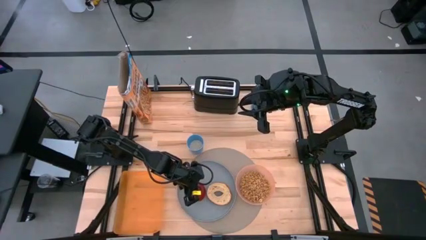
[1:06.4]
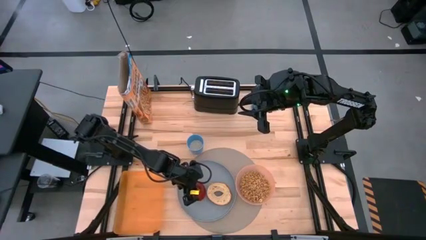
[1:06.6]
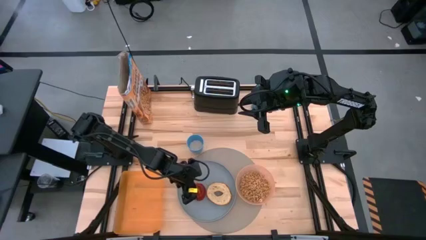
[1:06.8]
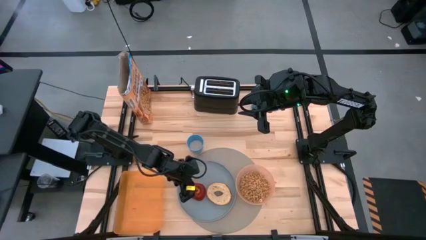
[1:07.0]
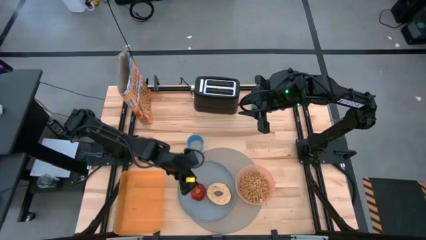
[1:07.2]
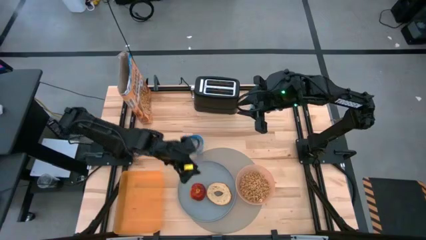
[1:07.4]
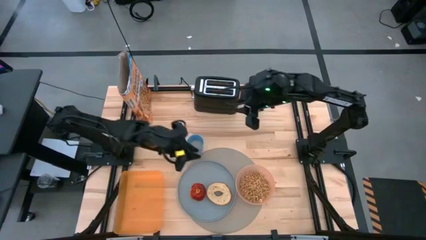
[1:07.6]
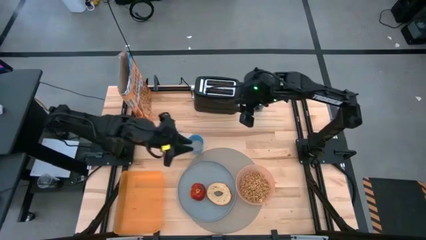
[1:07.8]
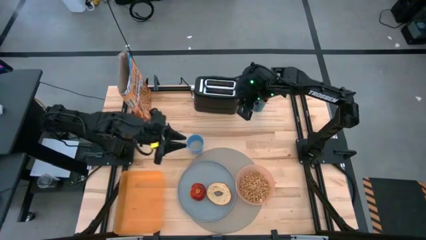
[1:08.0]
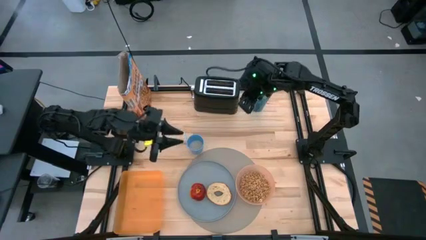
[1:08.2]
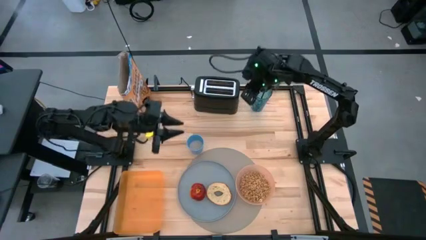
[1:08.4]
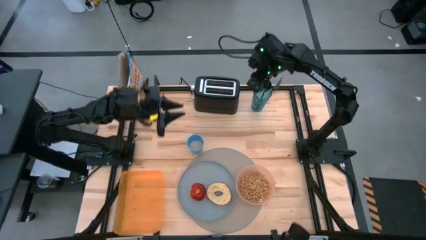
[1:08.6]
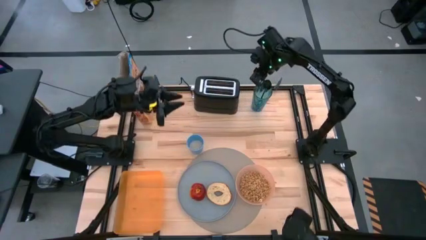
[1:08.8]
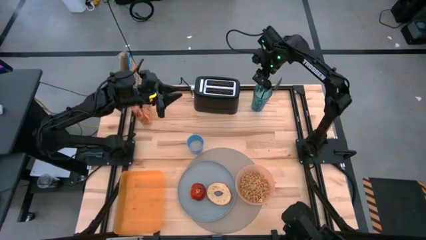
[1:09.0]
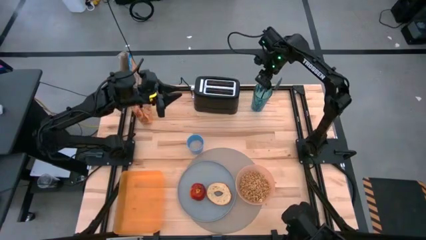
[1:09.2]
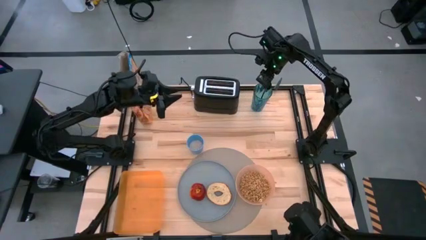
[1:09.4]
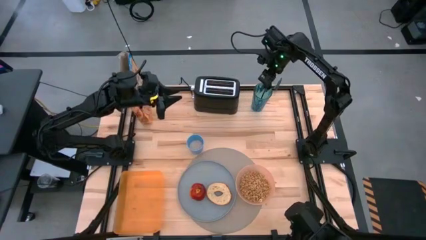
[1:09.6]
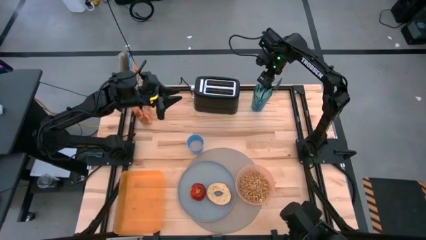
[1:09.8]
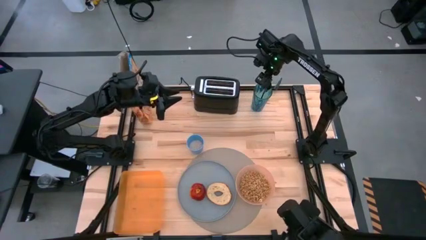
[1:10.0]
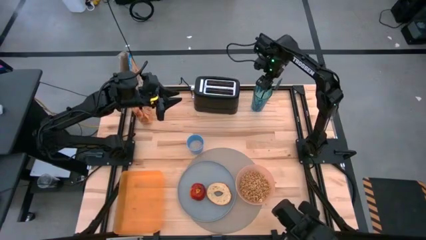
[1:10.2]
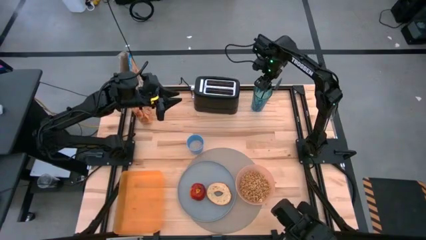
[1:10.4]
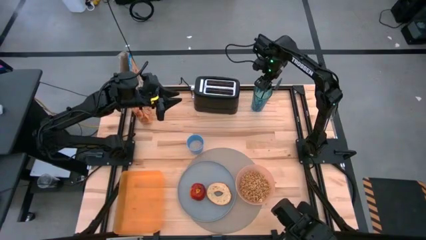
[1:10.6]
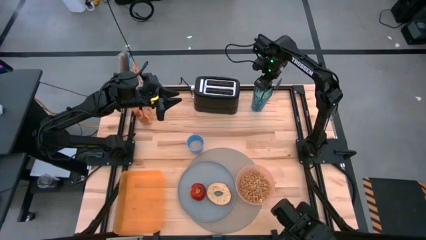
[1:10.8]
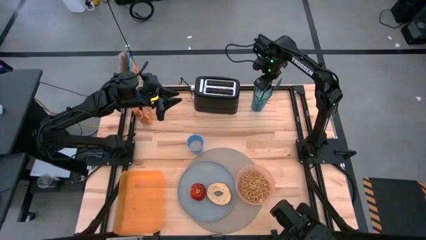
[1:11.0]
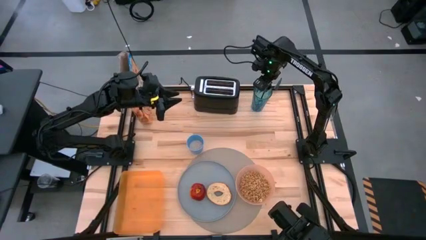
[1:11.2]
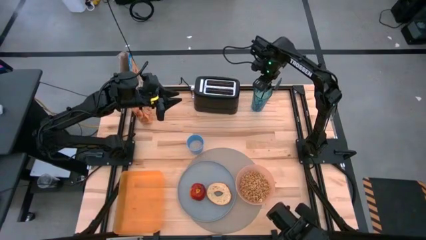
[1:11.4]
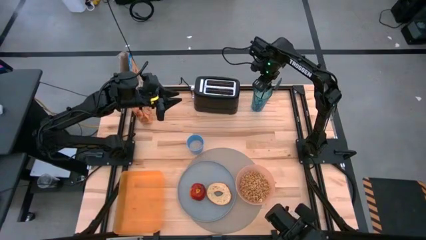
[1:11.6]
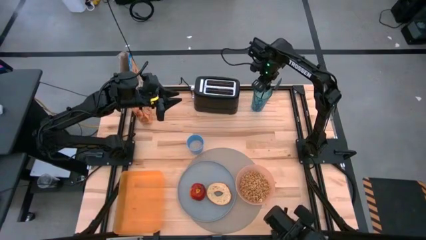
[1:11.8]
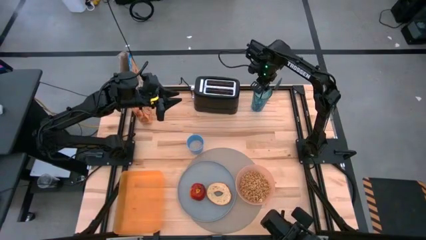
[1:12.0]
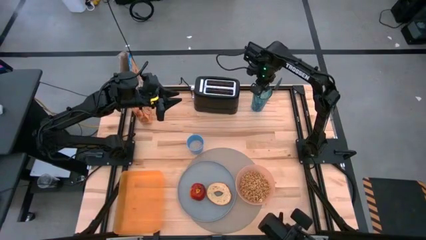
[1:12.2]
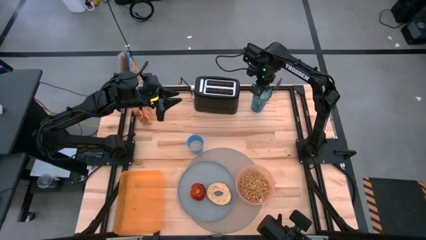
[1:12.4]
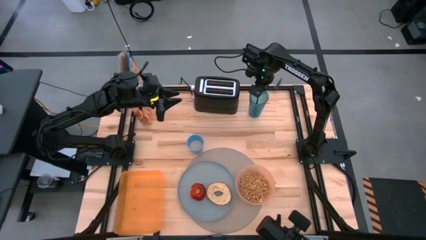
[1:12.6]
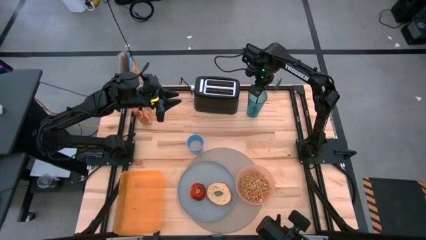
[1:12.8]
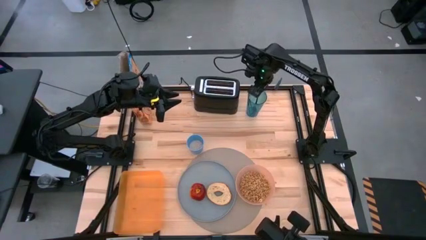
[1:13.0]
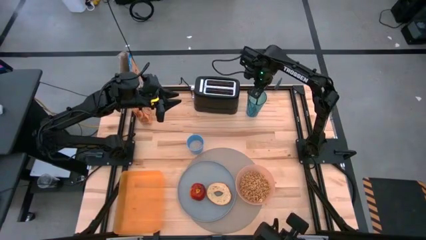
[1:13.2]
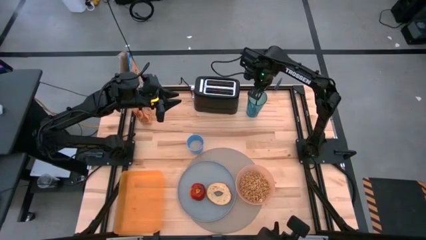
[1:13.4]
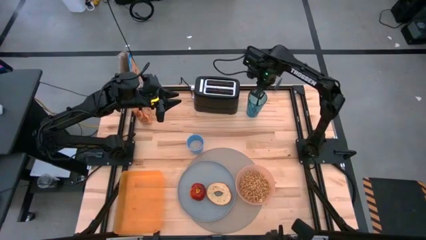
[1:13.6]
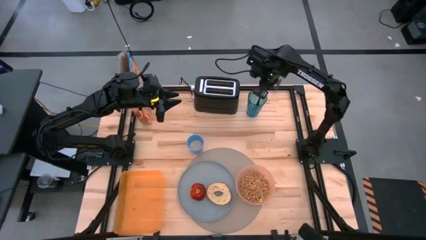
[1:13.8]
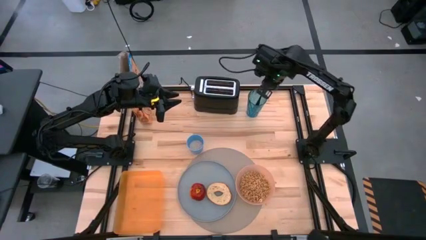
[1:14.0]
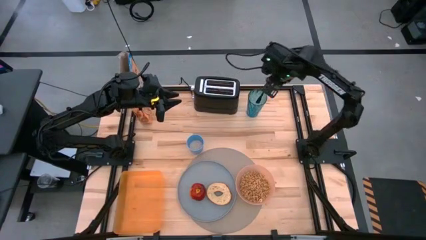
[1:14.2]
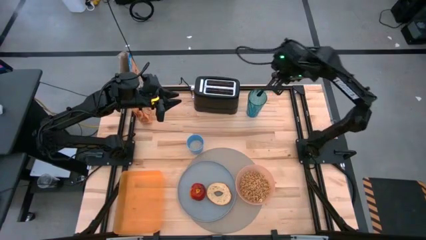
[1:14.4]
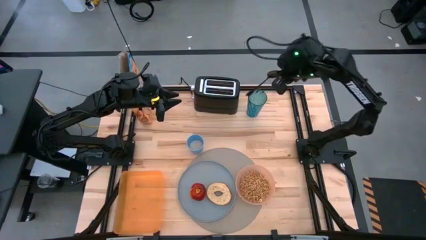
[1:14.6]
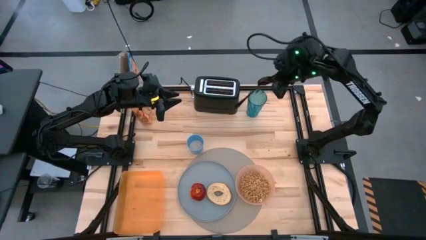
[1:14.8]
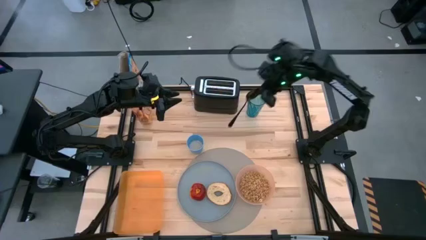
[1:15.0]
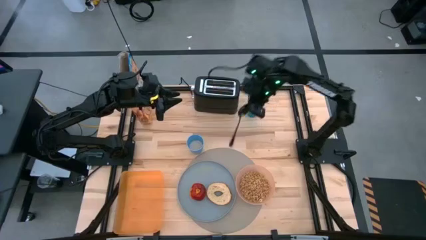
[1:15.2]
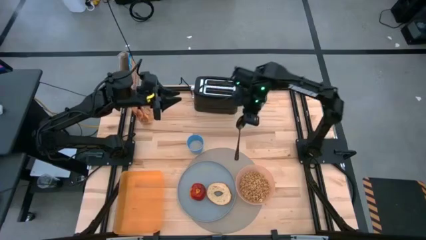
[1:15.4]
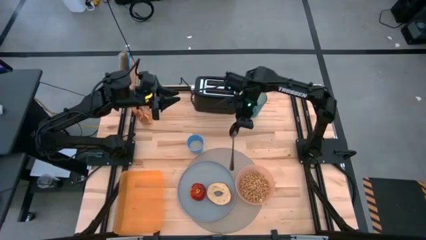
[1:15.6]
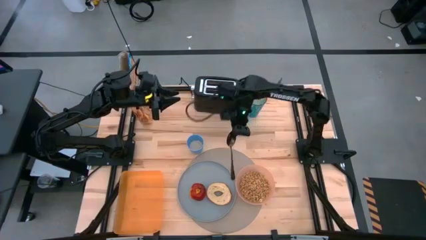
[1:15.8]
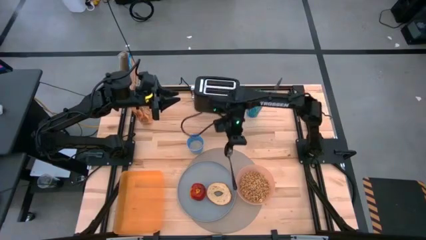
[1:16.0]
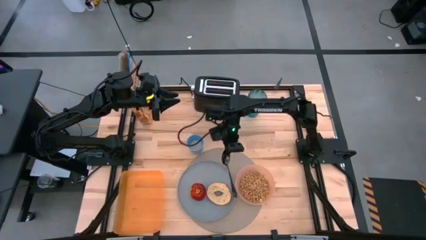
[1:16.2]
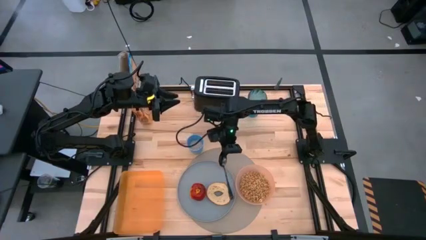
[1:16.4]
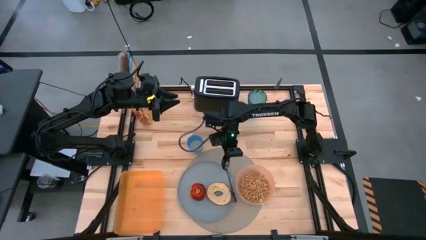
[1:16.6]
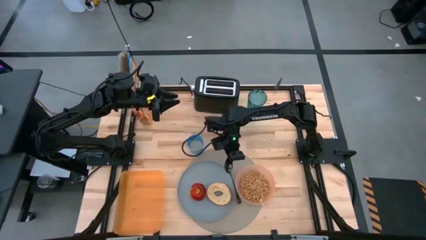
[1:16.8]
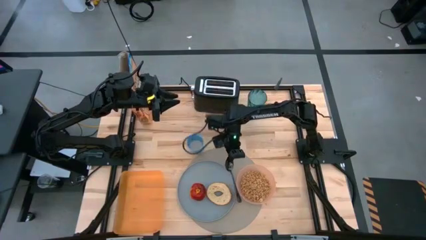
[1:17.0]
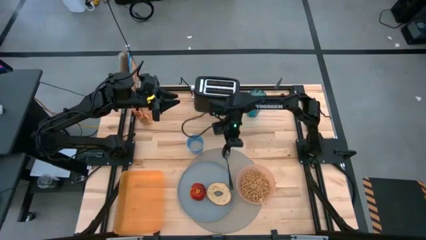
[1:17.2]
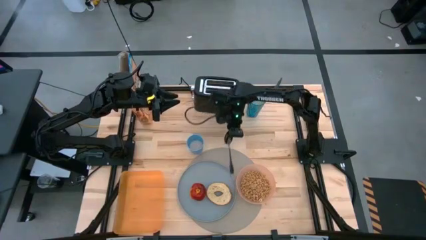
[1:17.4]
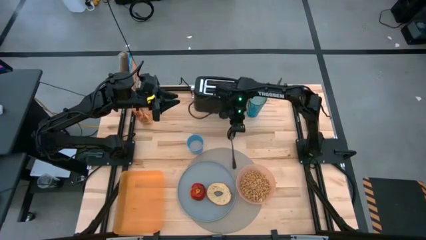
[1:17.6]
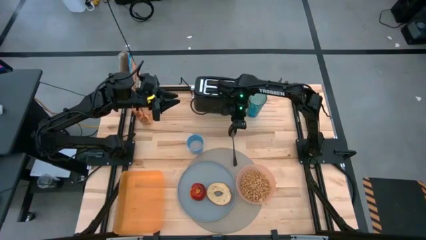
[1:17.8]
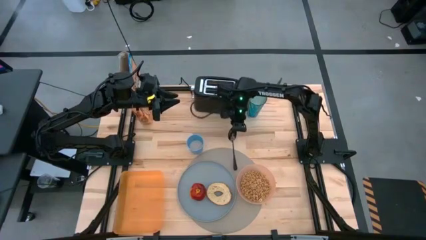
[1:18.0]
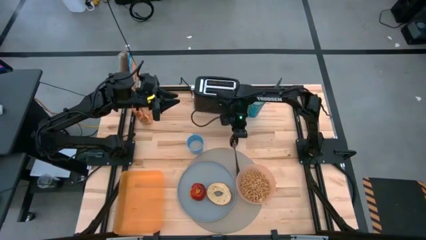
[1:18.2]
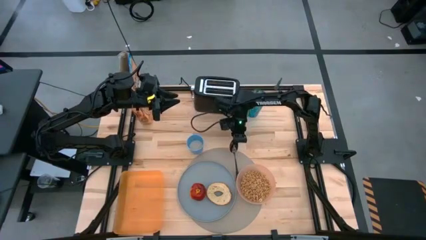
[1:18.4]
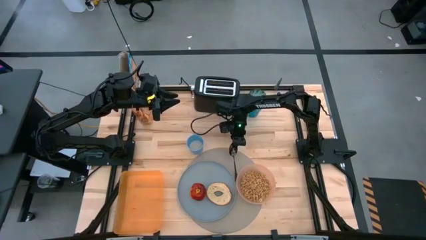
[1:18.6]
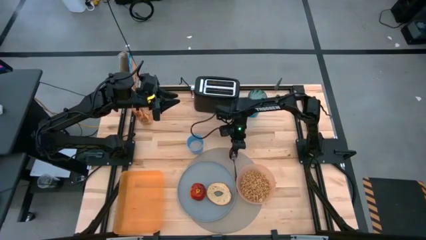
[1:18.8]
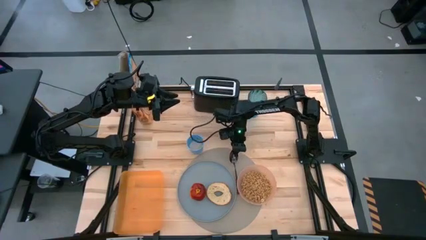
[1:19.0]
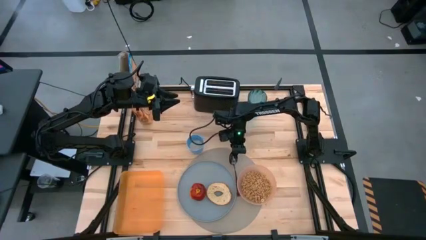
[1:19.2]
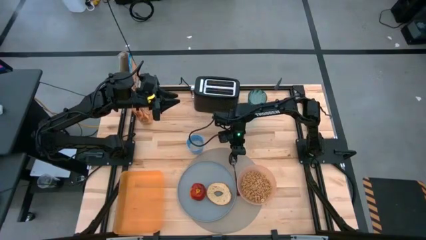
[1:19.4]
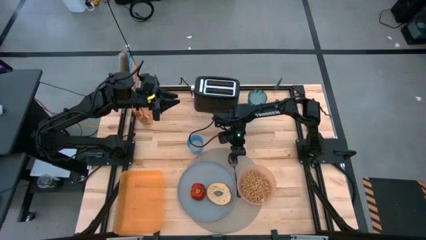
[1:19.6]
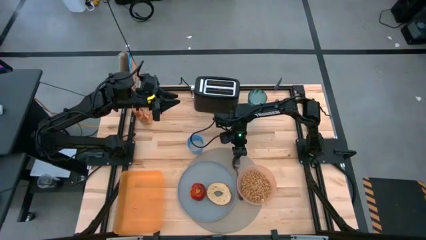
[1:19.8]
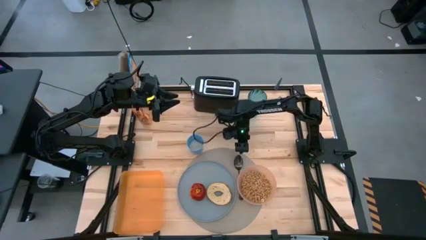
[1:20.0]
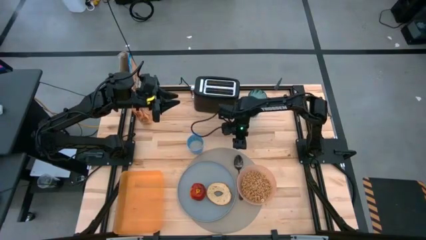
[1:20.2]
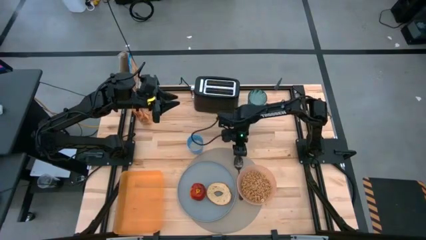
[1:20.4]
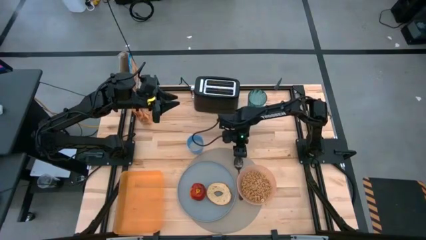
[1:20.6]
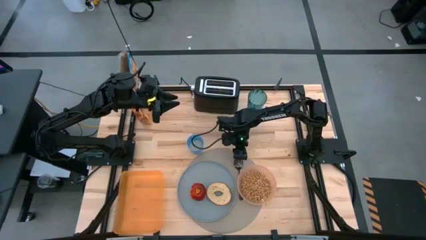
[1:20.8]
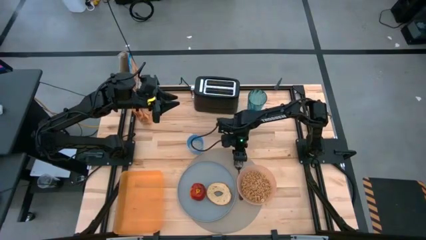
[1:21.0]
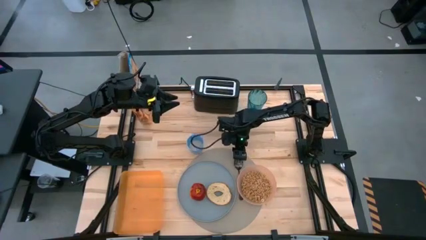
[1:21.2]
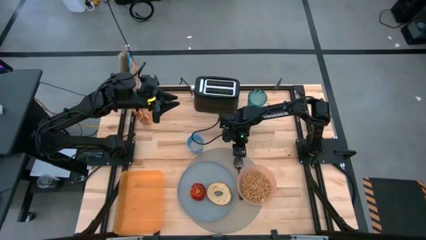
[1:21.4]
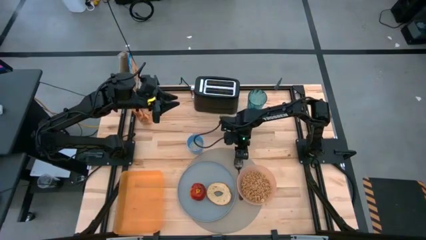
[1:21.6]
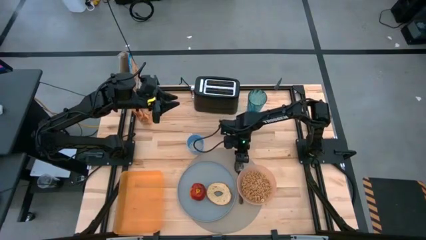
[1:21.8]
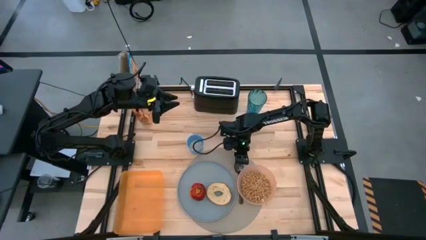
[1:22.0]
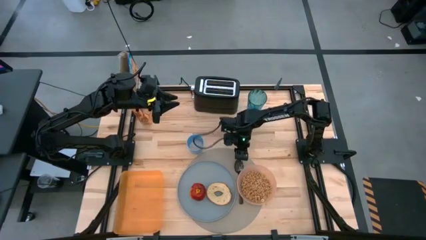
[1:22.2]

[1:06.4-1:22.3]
Task: Arrange a breakfast setting
Put the black spoon from the blue cup on the brown placemat
